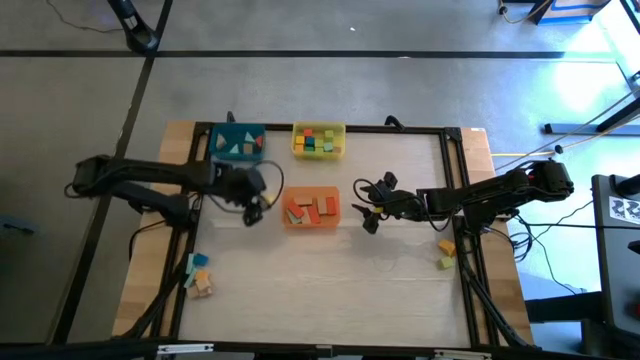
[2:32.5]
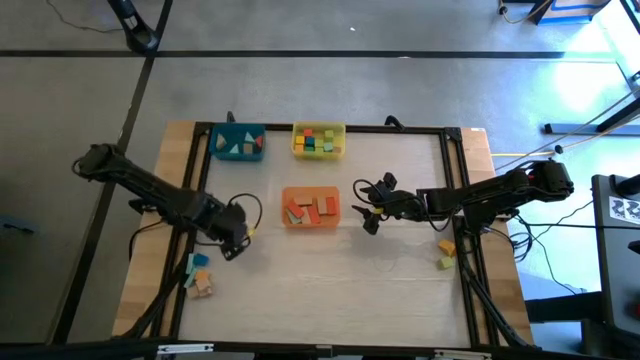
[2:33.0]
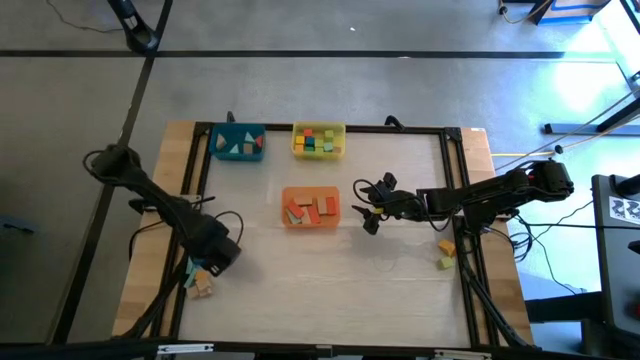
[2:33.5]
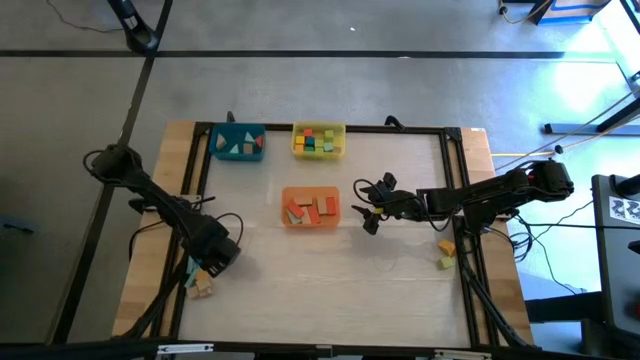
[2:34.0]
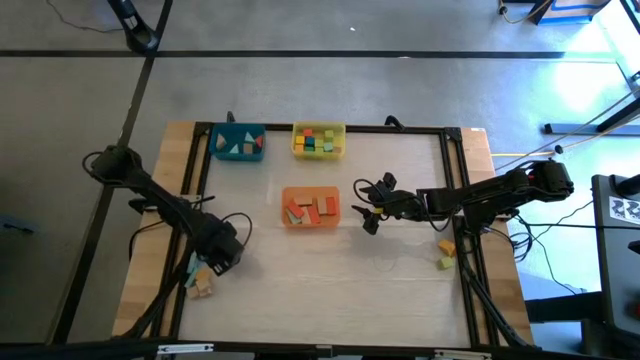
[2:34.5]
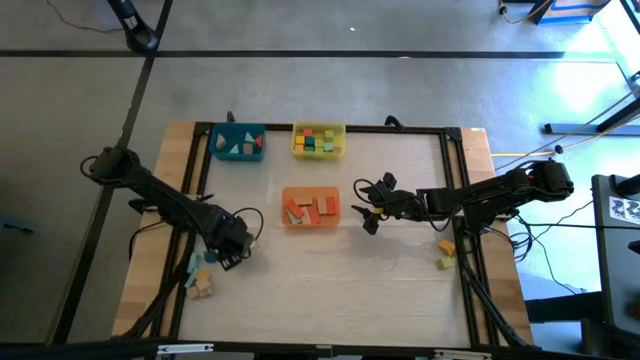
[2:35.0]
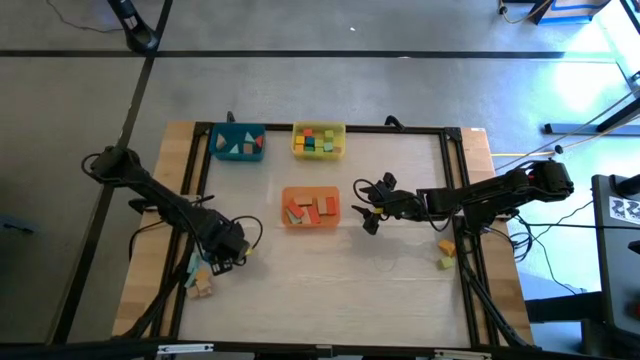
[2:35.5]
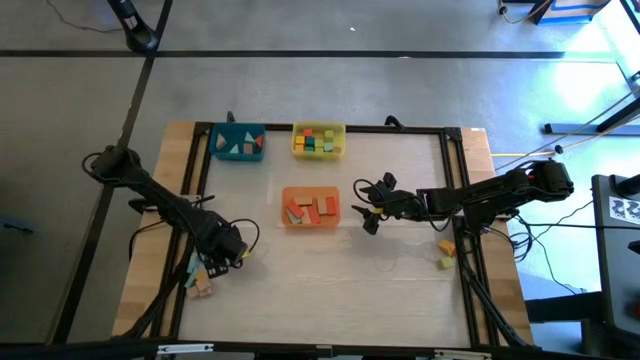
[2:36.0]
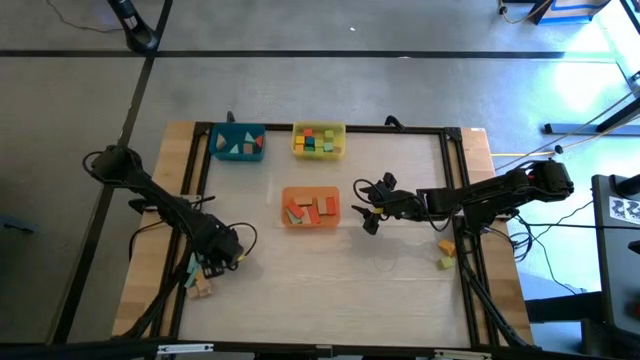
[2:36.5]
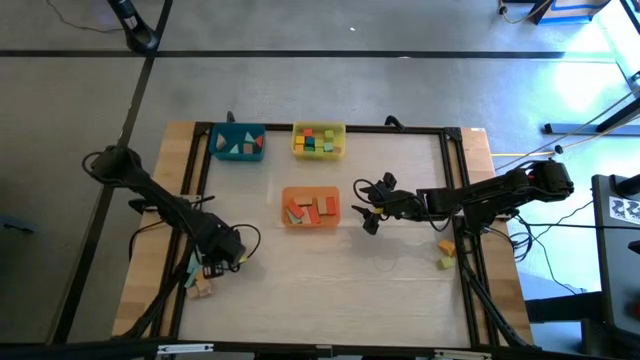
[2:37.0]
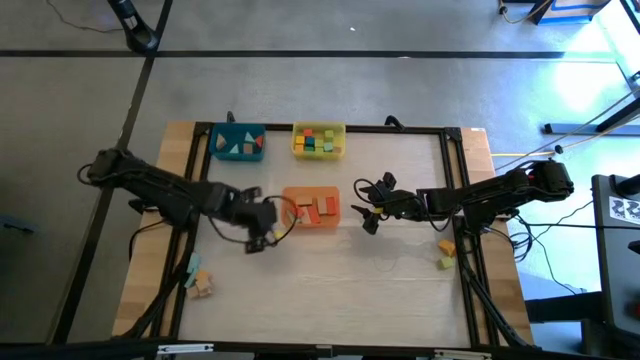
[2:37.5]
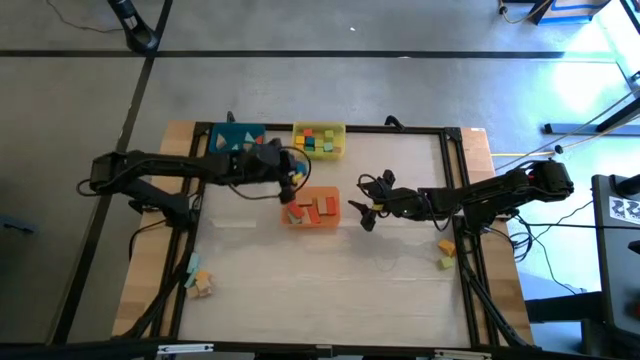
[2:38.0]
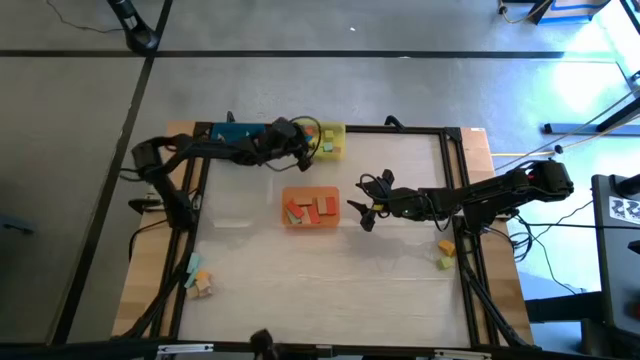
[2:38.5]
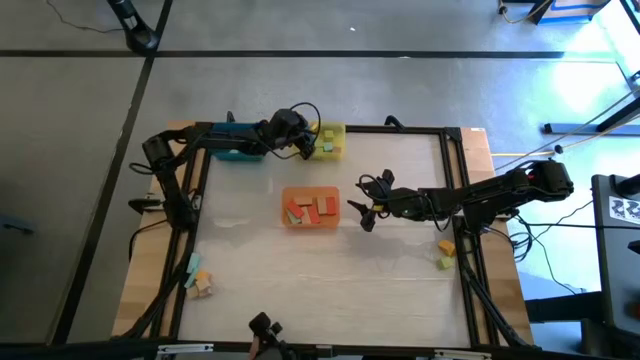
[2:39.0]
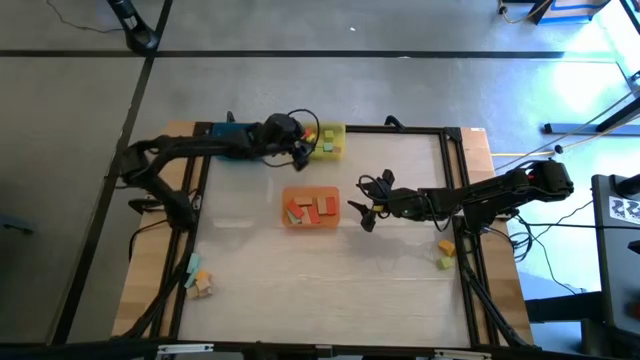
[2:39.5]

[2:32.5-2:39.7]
Task: Sort blocks by size
Put the blue square block into the yellow bin

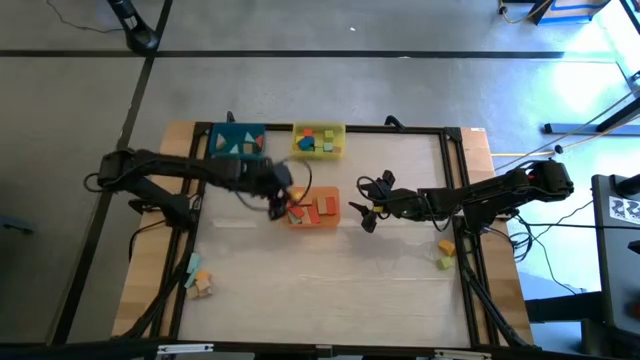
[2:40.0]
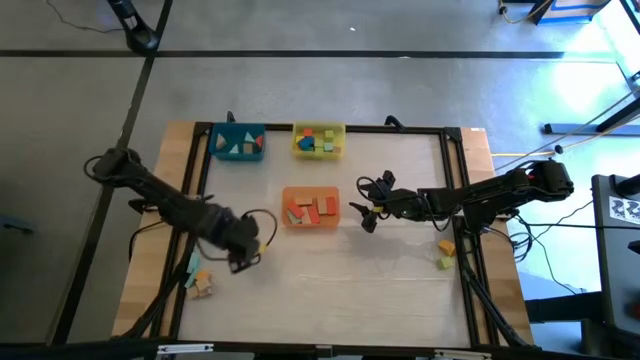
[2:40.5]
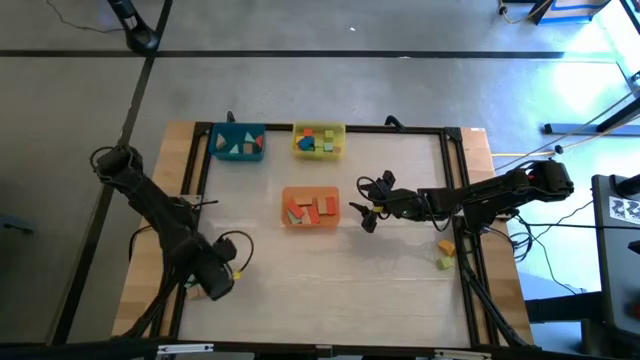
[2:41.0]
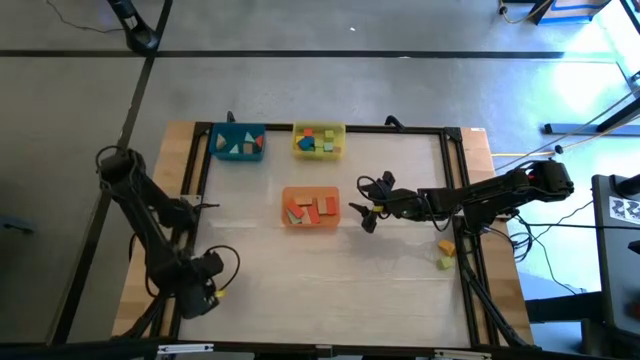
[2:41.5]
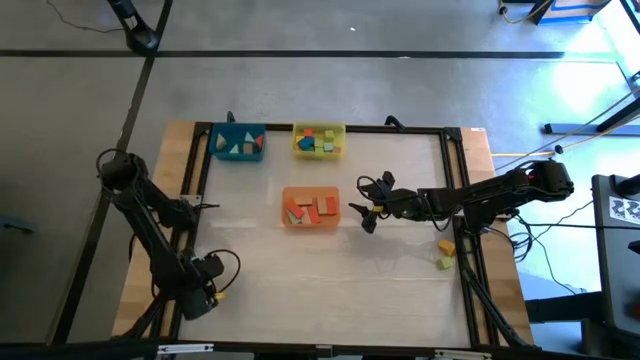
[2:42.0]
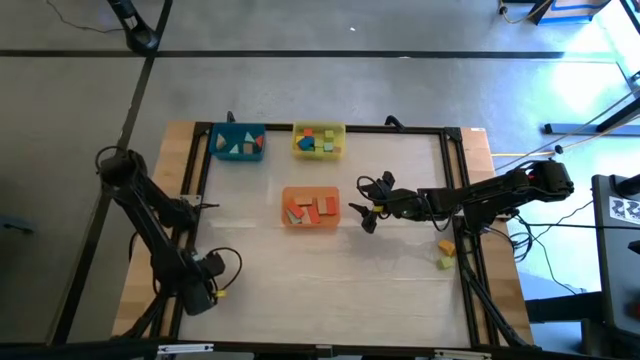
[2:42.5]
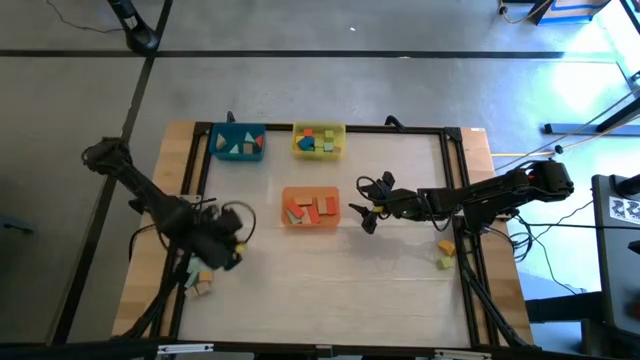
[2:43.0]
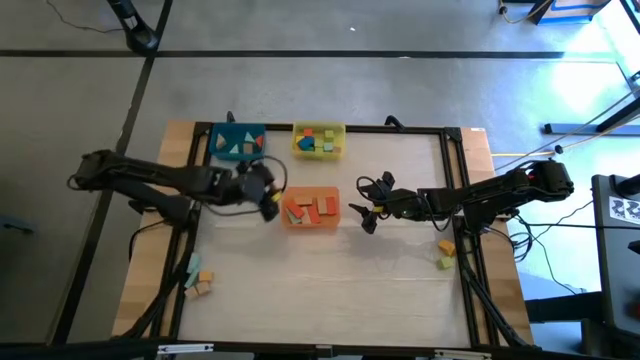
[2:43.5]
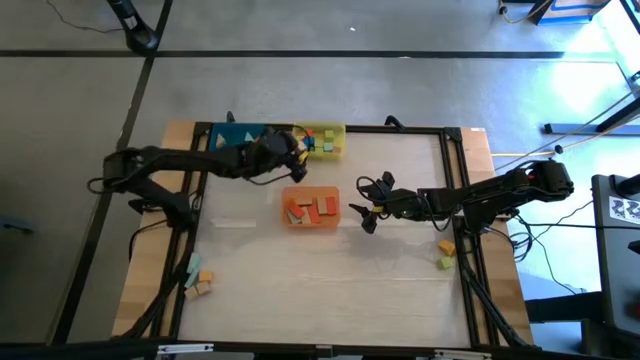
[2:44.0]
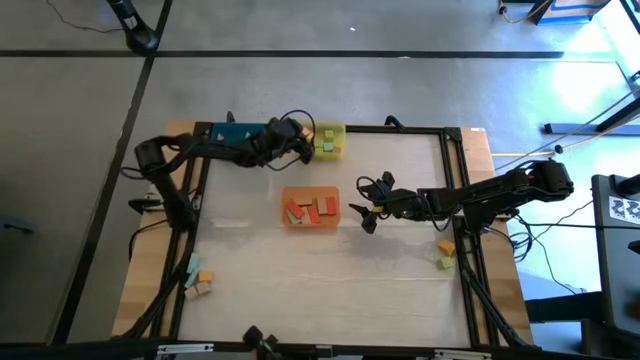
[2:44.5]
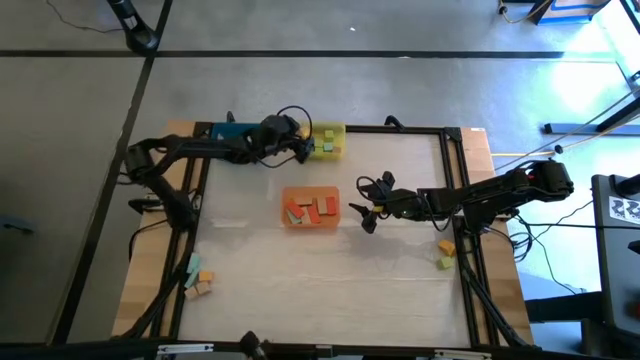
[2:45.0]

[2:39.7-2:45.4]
Put the brown square block into the yellow bin

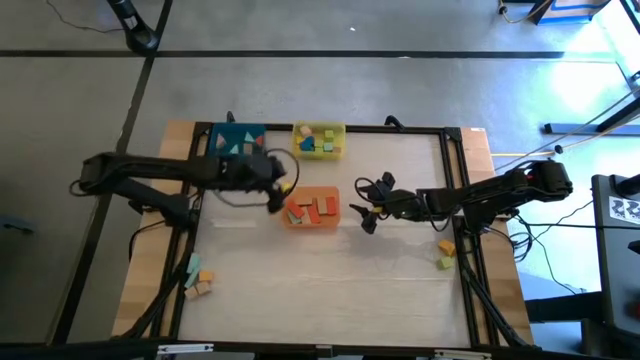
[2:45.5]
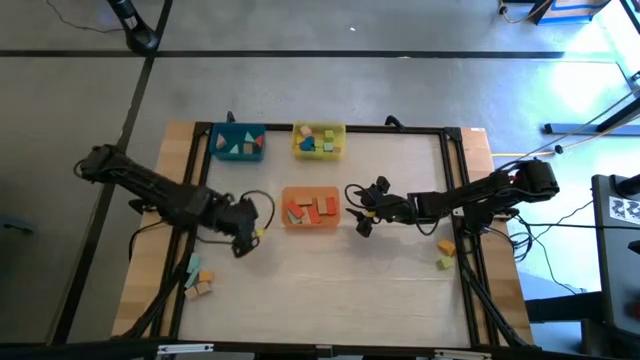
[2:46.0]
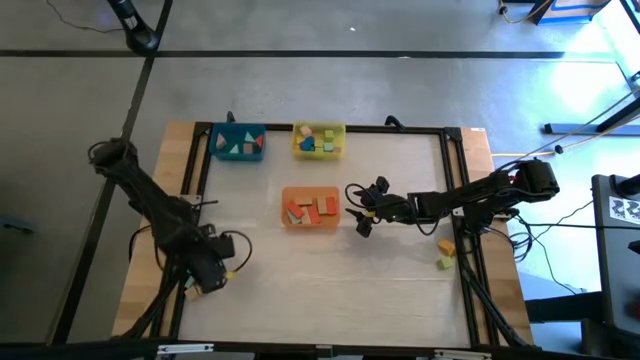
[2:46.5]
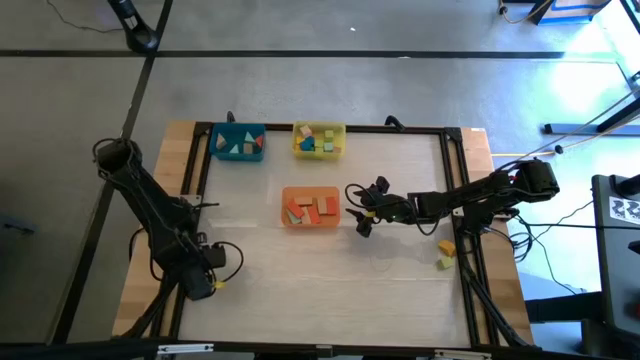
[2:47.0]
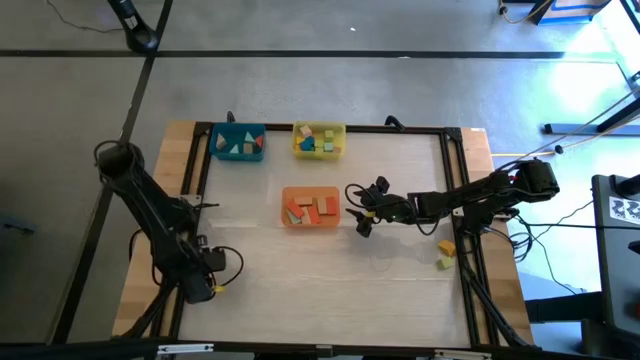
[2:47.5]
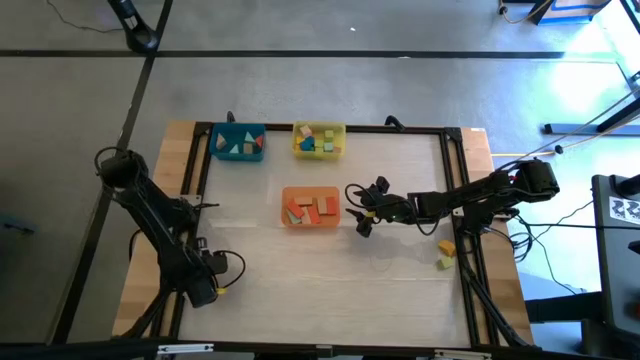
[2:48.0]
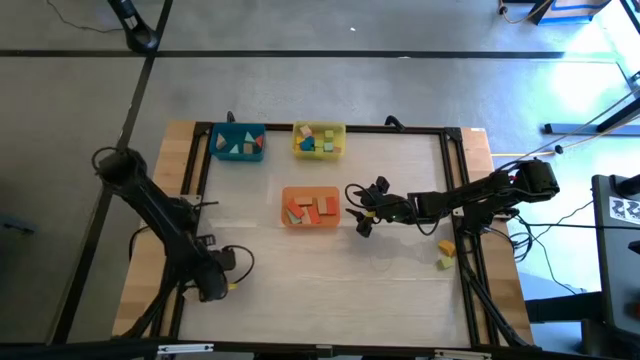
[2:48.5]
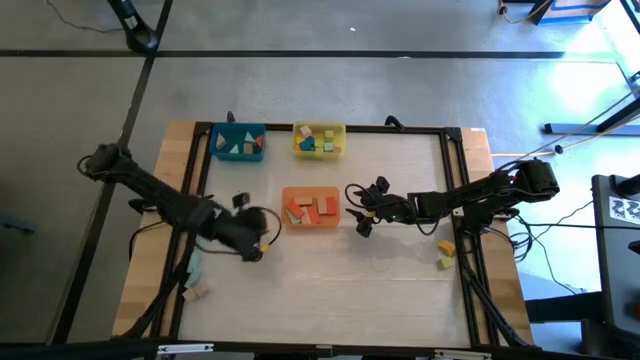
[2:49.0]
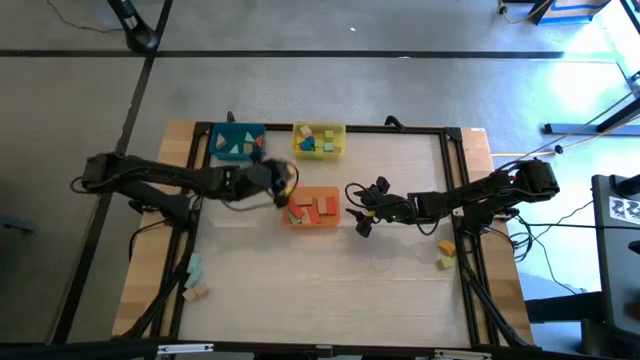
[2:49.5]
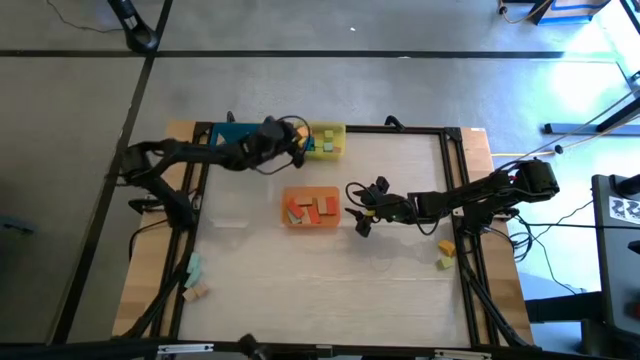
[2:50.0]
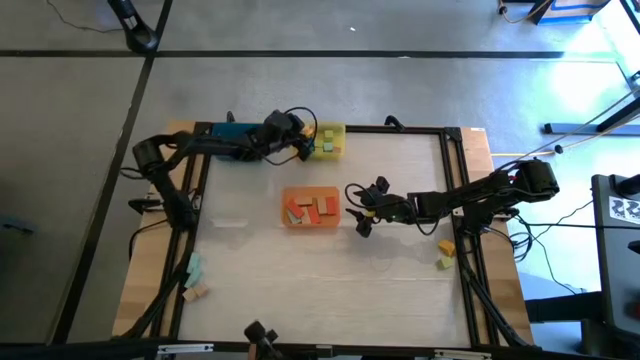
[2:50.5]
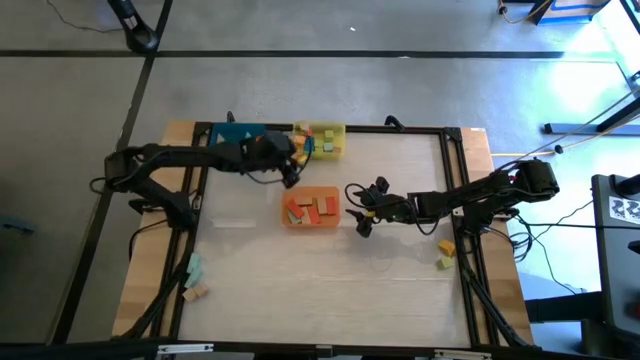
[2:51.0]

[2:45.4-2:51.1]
Put the yellow square block into the yellow bin

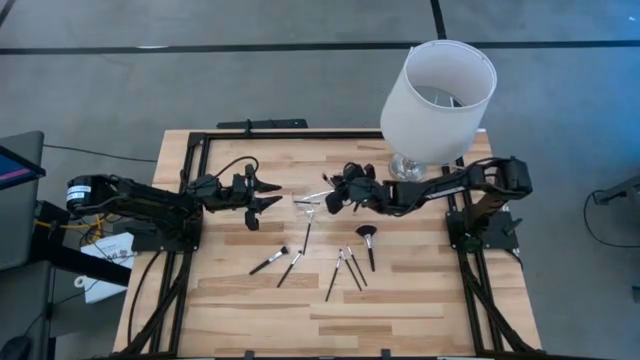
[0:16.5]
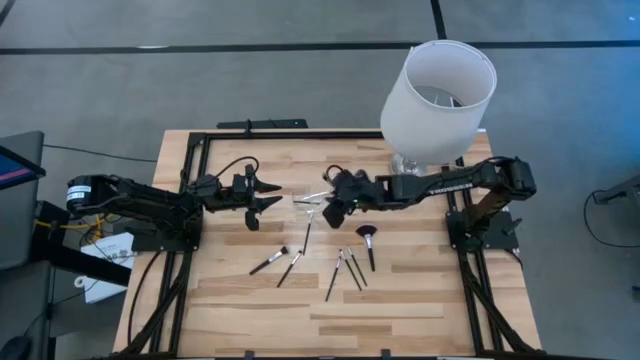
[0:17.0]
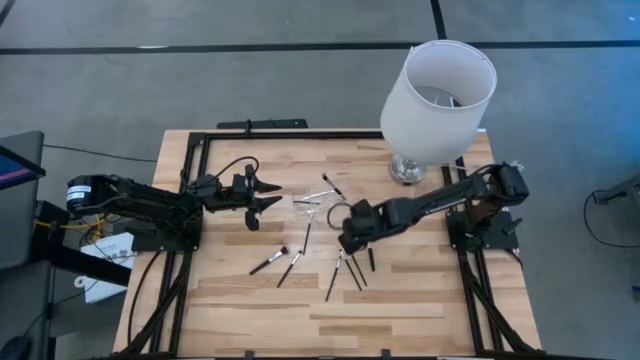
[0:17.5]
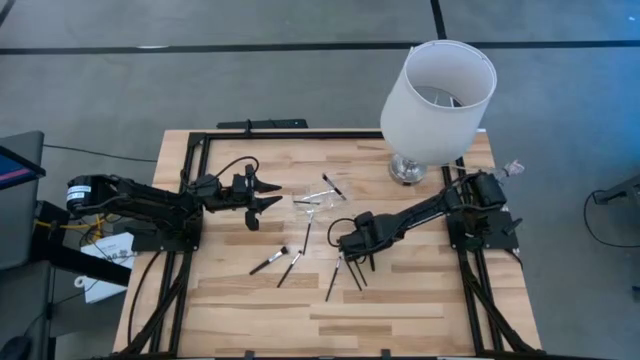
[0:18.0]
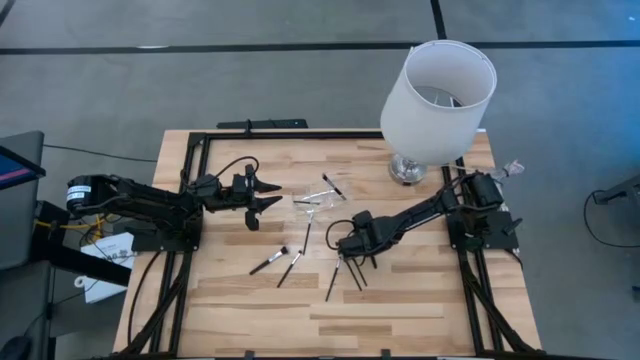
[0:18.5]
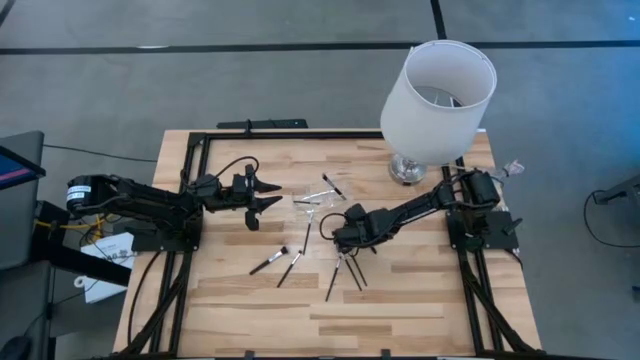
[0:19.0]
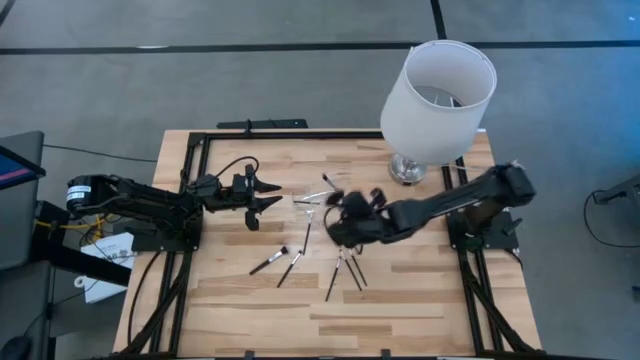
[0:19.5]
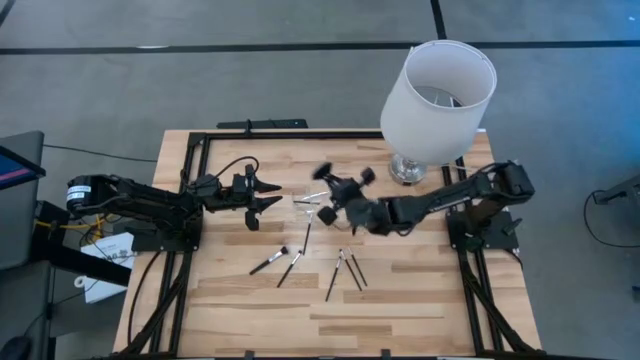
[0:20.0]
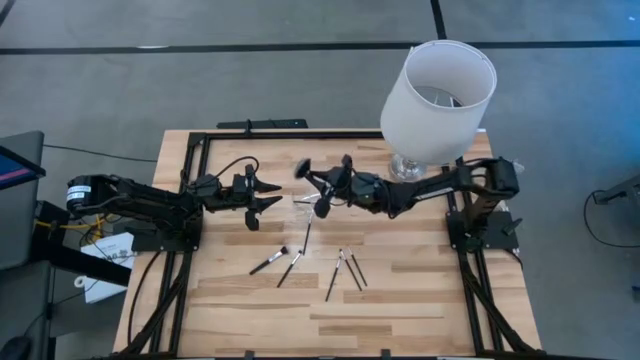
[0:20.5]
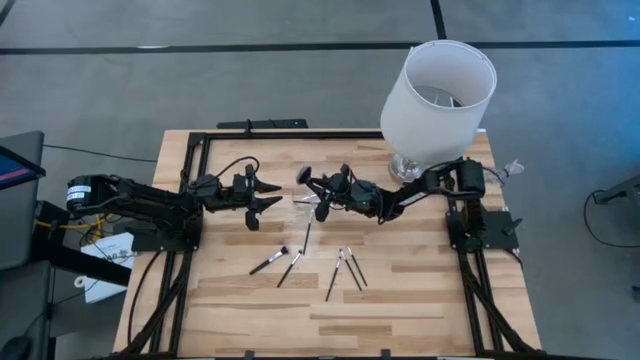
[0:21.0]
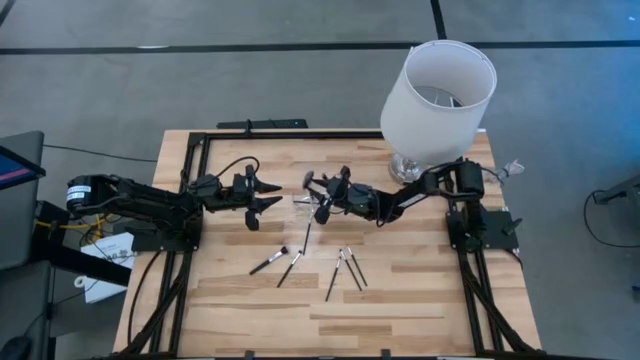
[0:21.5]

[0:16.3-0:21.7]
Task: Pick & Place Makeup Supplies
Put the black makeup brush into the transparent organizer
